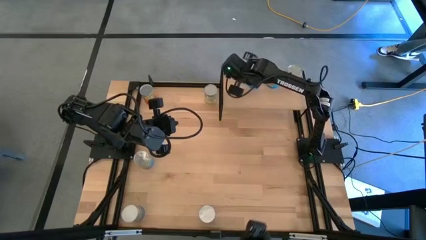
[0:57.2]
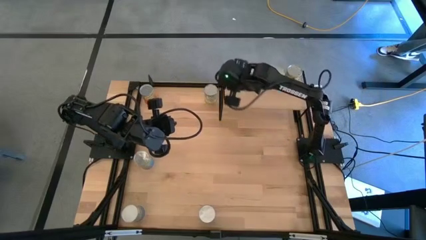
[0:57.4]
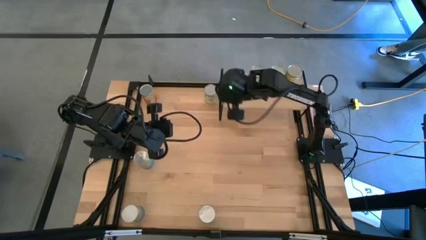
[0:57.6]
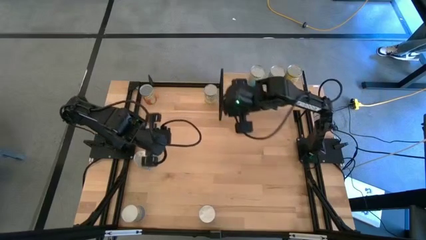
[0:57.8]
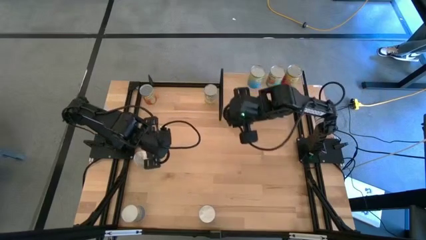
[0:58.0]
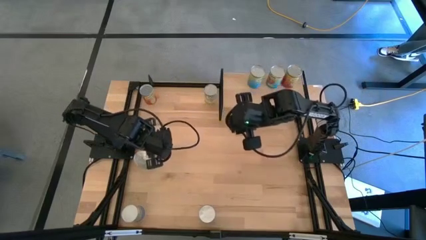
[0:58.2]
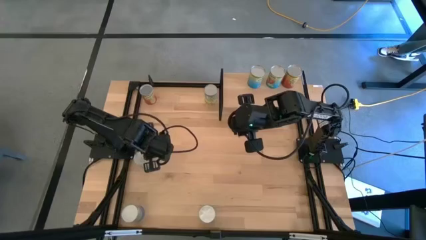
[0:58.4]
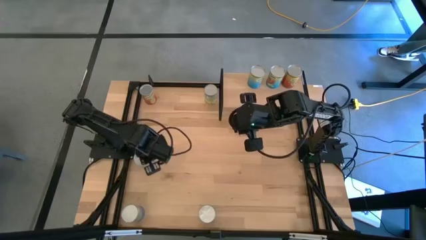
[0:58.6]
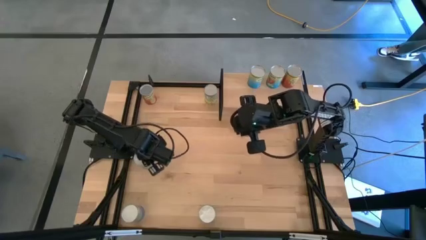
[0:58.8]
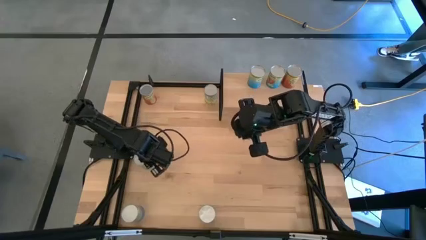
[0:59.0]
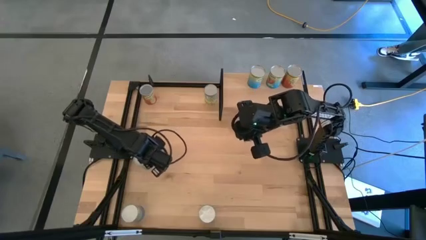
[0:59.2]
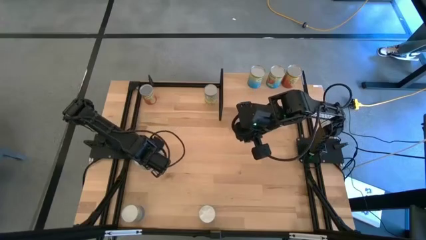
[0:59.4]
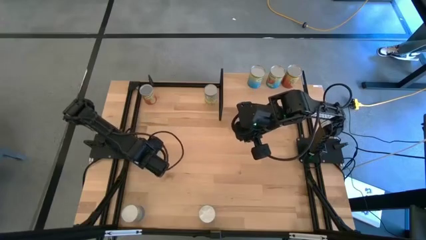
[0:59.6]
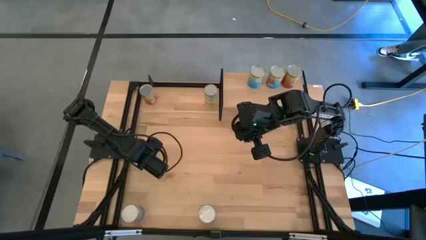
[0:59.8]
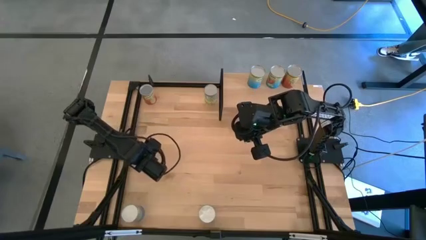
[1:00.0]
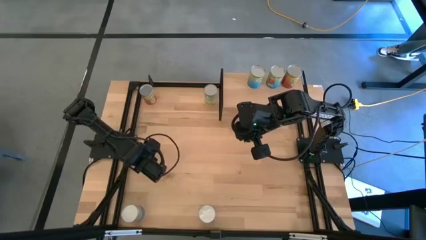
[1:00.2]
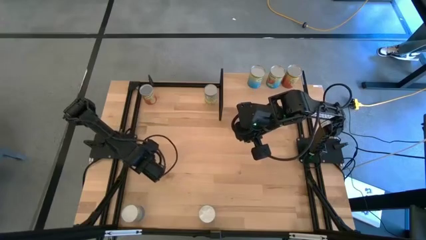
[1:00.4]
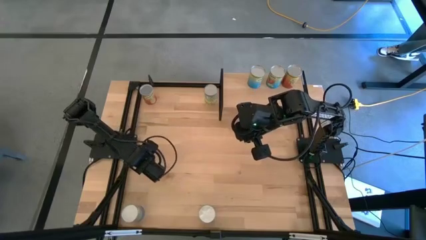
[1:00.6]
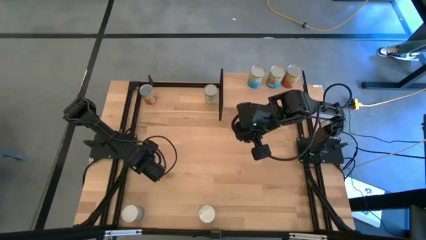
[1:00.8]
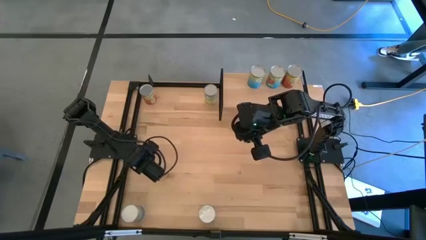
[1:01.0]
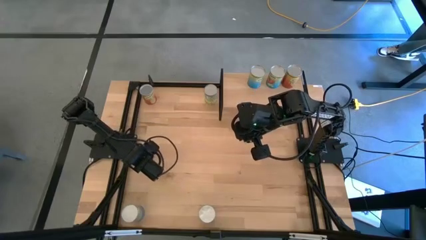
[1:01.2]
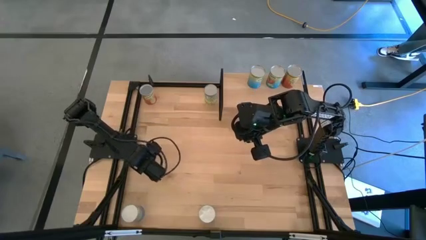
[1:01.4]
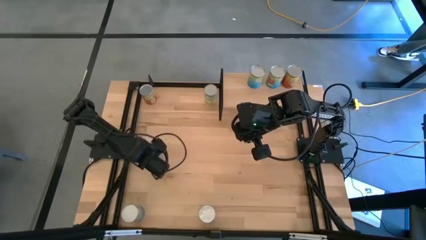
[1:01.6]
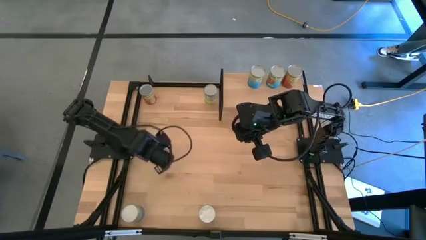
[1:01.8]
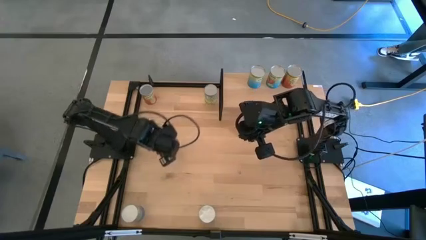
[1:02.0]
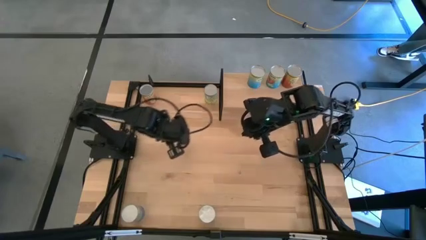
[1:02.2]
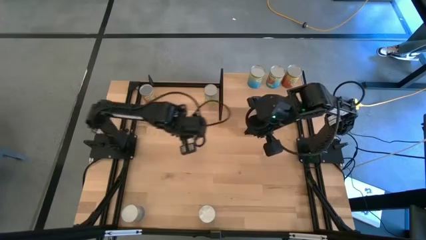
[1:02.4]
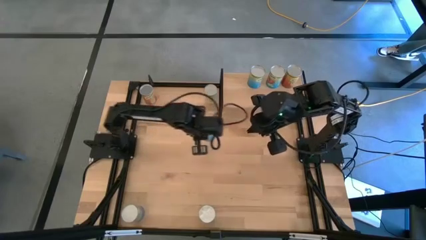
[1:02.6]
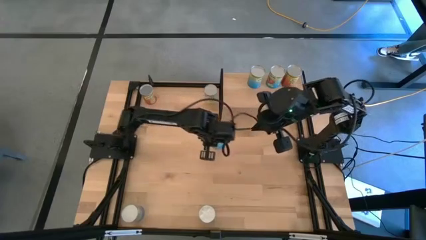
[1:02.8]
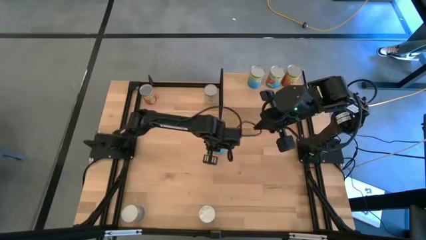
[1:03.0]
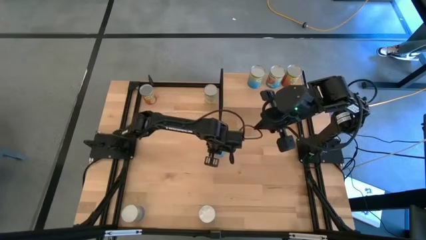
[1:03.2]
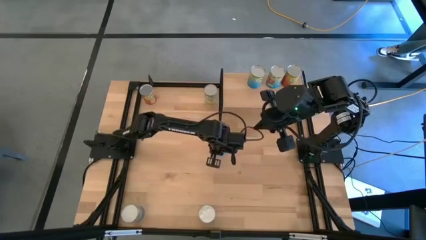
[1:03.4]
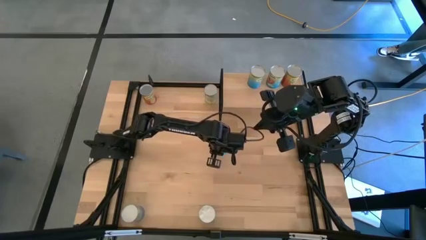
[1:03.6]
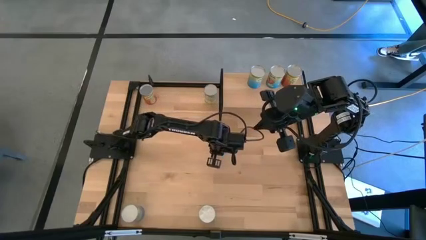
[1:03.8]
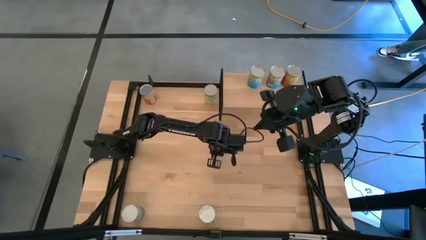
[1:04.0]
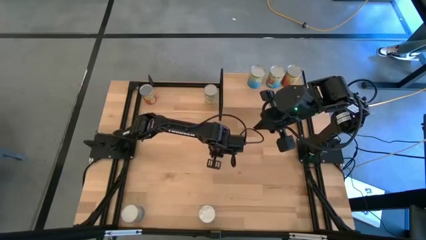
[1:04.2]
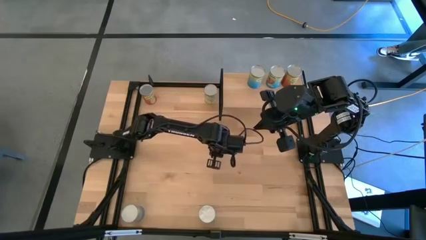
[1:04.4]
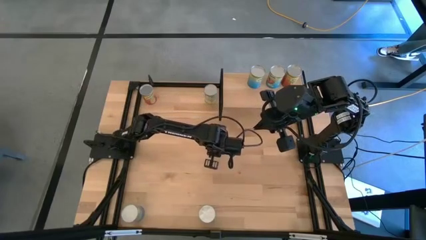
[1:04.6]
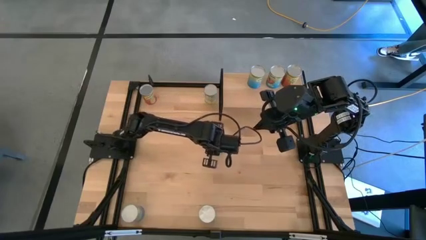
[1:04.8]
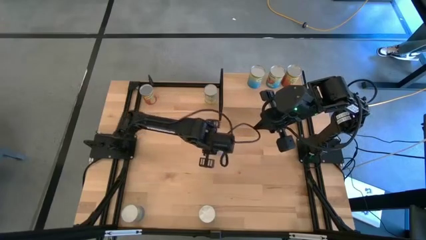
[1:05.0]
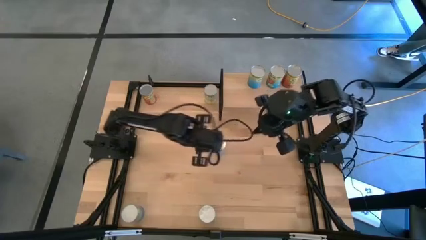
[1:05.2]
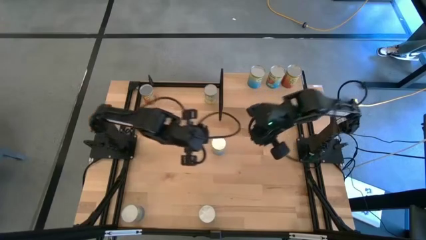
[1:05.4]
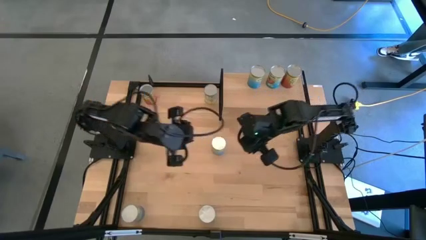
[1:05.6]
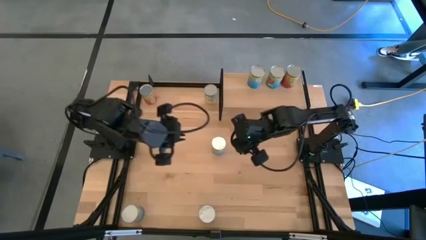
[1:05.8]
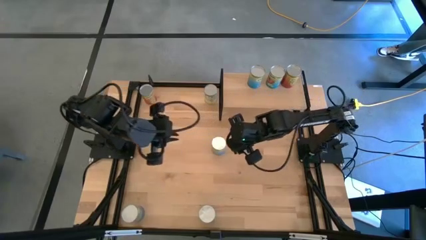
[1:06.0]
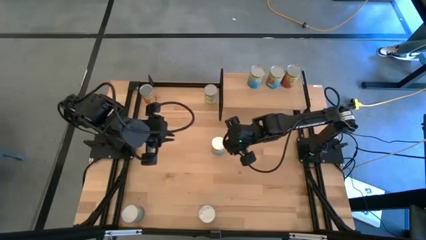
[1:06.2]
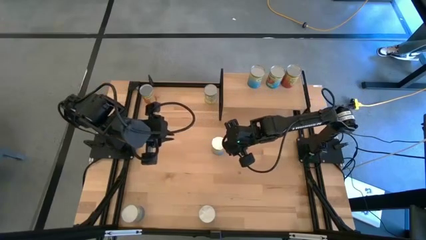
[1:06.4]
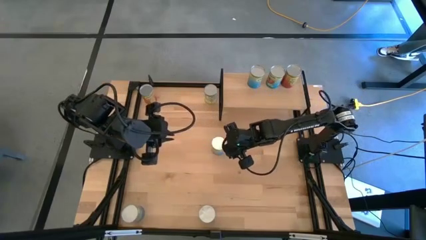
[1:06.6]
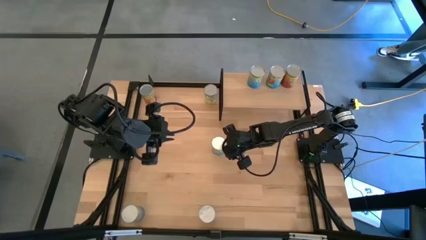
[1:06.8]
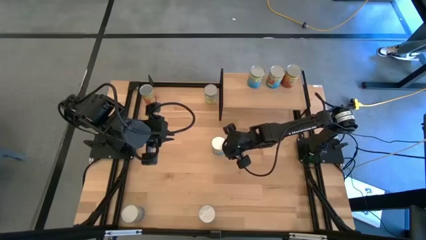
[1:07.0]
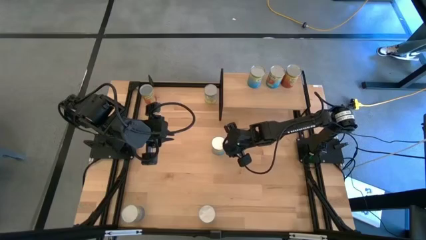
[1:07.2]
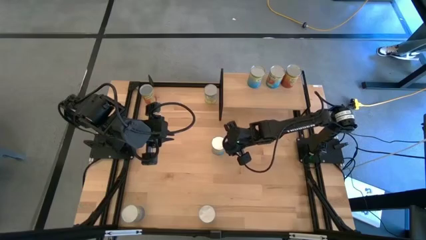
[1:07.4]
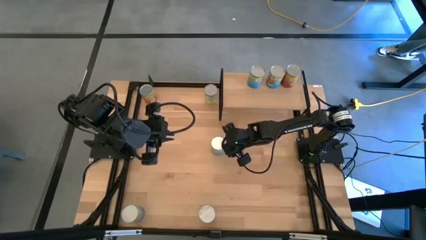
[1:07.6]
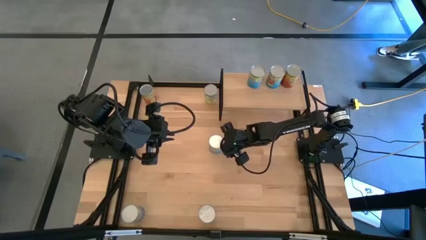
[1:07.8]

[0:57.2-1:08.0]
Task: Pick and place cans onto a shelf
Put the canned cherries on the shelf

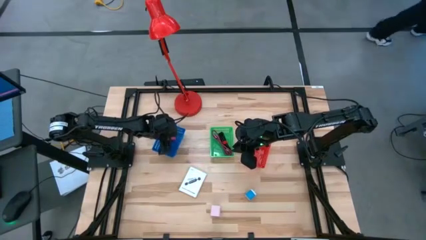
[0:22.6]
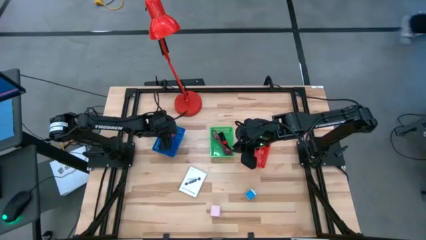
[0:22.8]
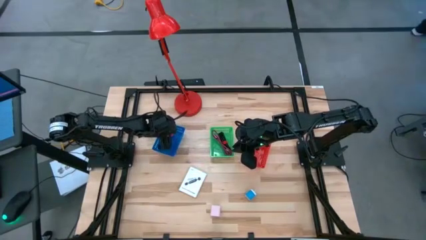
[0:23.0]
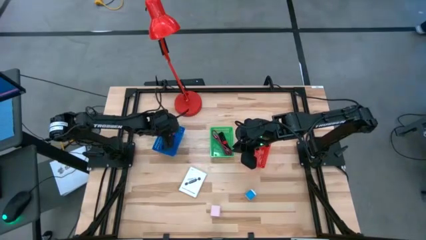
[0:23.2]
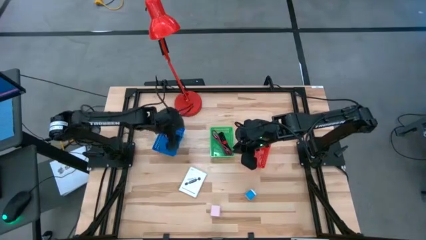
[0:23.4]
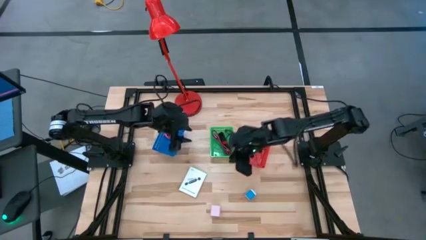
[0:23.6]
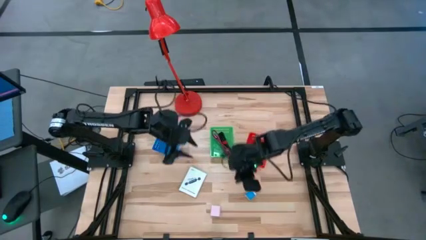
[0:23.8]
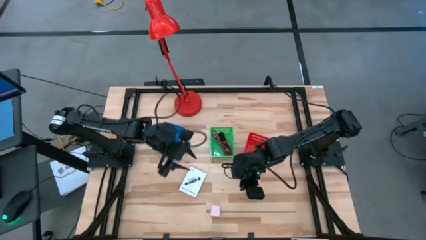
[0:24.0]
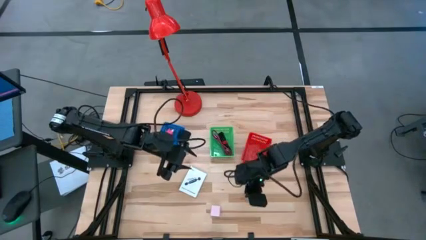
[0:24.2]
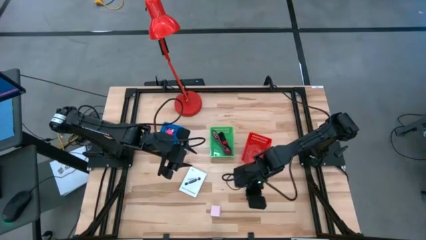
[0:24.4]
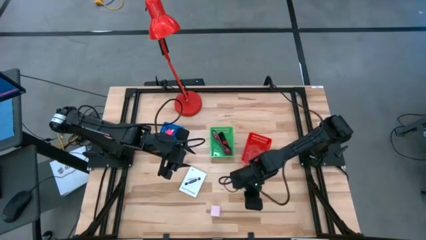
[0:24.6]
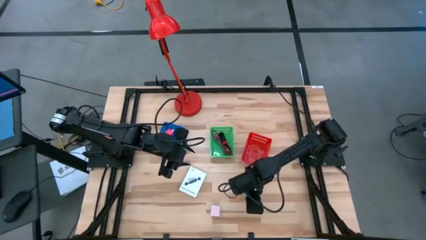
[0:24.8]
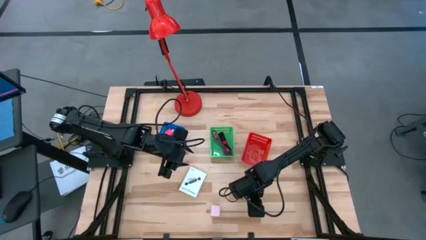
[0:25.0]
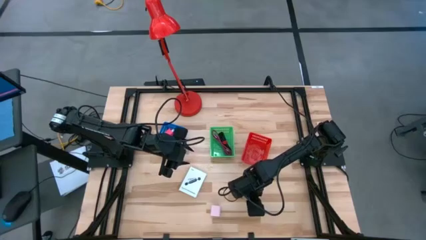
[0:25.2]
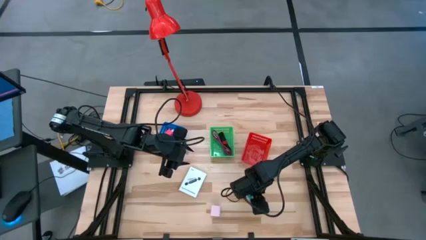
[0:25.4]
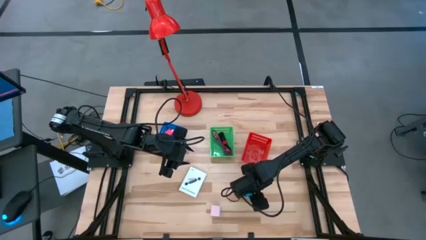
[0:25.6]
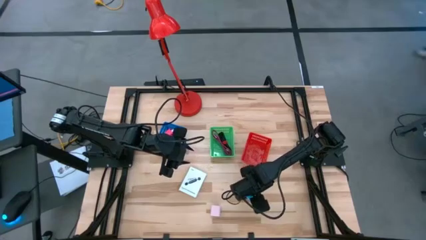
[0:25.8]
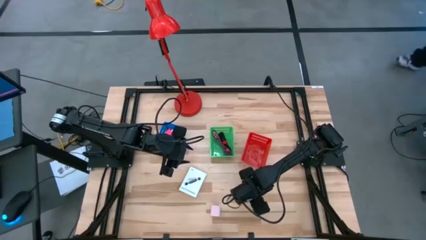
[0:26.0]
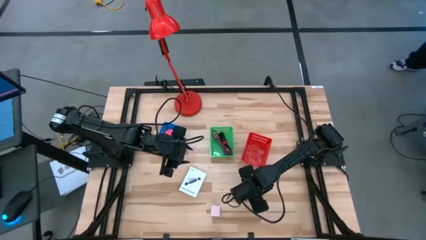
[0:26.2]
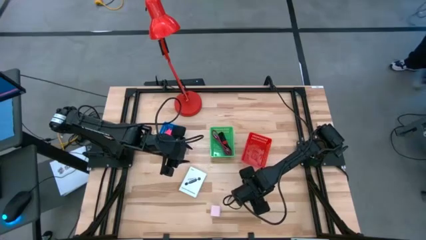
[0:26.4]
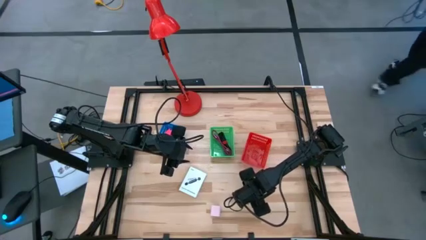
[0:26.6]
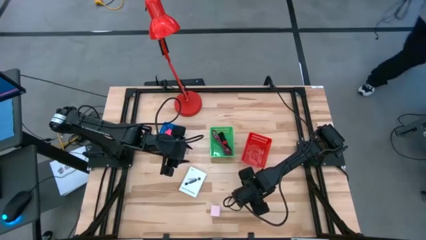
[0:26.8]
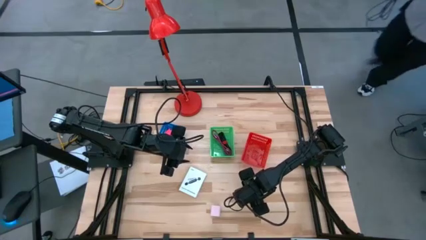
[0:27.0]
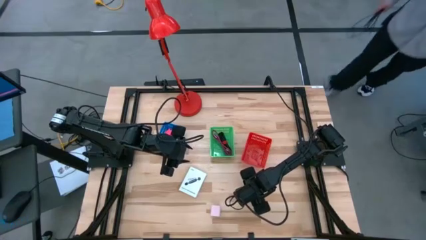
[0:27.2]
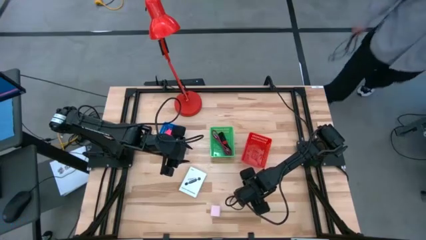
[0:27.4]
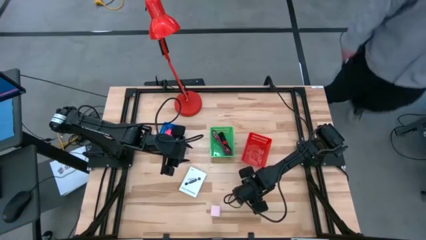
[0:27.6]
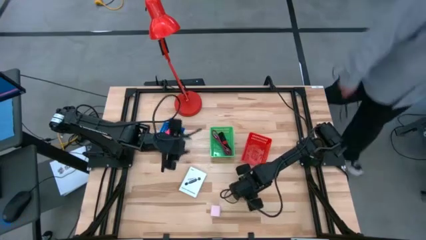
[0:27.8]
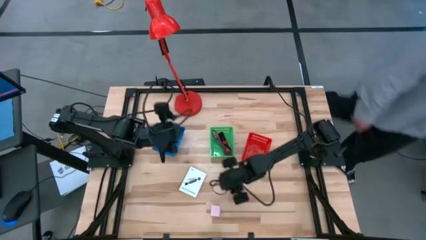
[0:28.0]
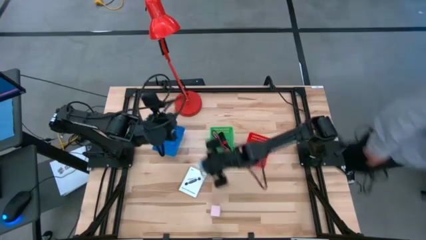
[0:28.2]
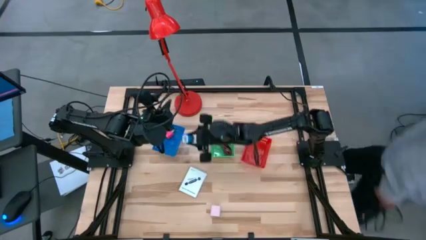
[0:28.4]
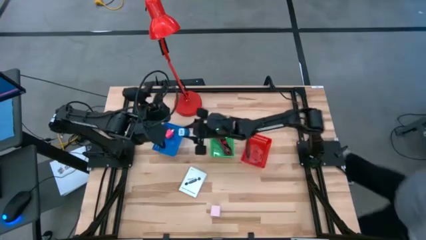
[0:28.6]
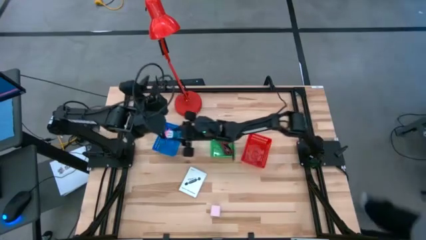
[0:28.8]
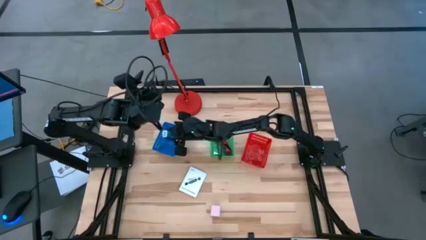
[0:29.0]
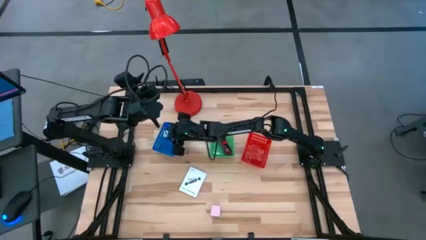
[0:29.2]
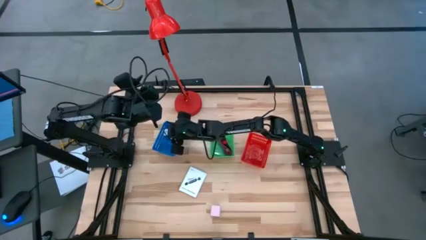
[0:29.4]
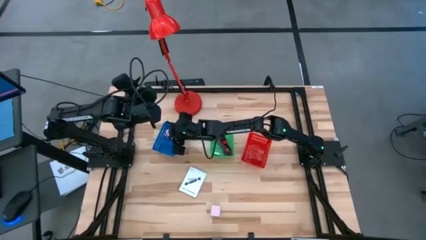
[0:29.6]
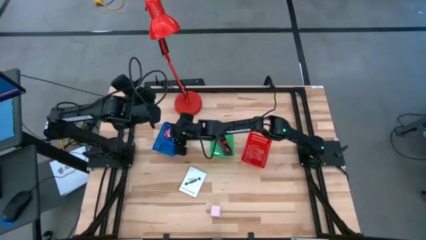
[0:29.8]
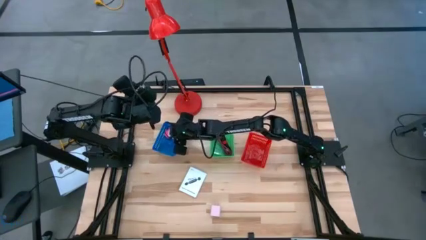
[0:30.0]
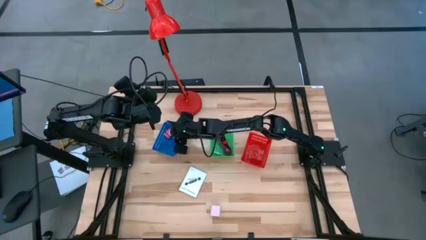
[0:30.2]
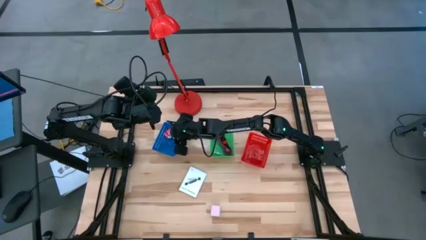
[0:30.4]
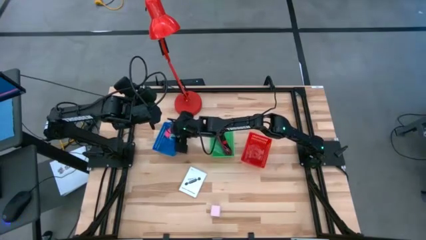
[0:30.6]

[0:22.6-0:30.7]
Task: Pick and place items into bin
Put the blue charger adapter into the blue bin
